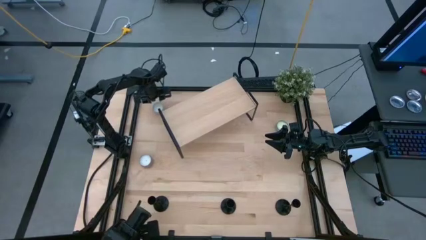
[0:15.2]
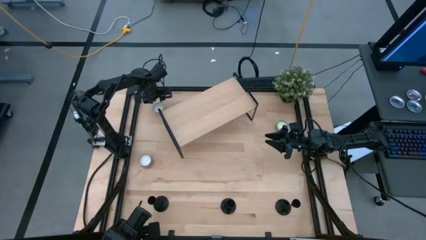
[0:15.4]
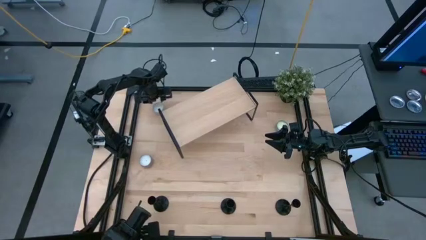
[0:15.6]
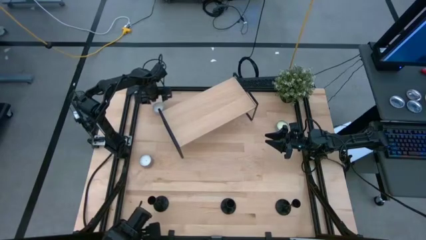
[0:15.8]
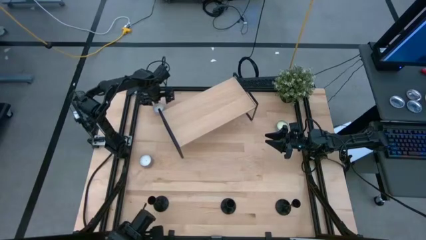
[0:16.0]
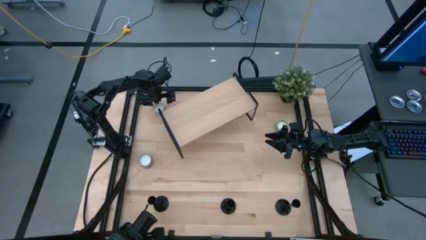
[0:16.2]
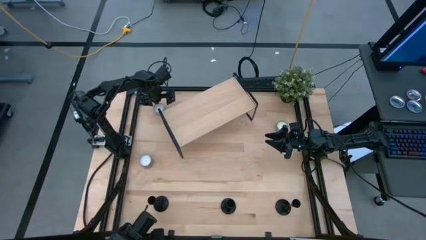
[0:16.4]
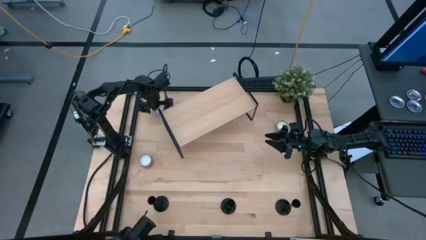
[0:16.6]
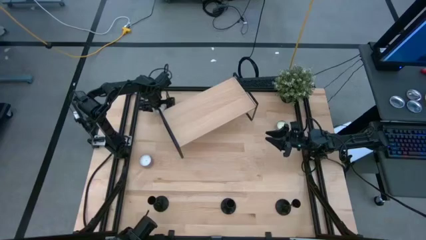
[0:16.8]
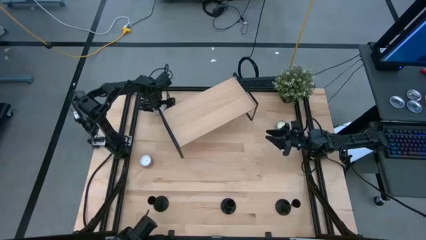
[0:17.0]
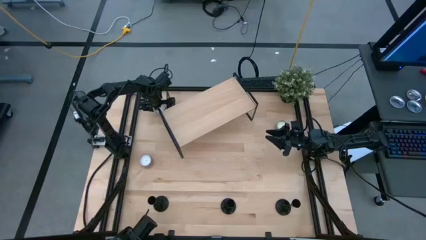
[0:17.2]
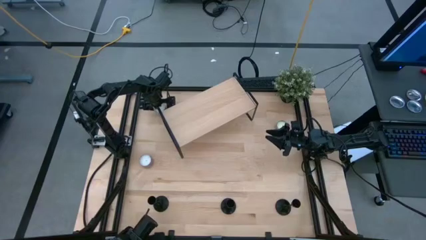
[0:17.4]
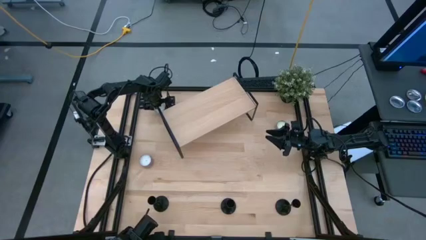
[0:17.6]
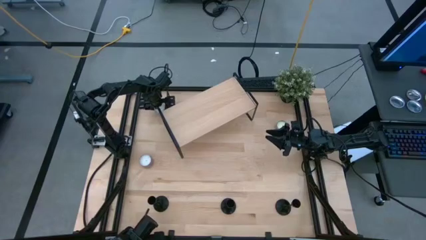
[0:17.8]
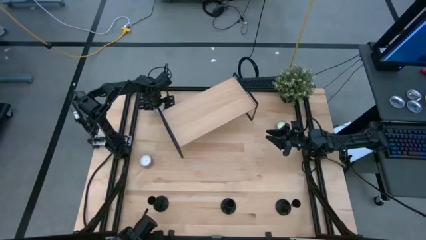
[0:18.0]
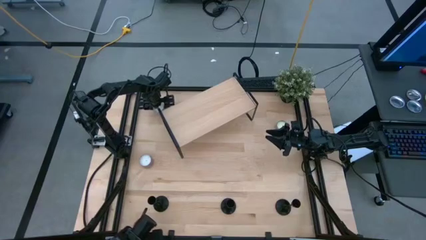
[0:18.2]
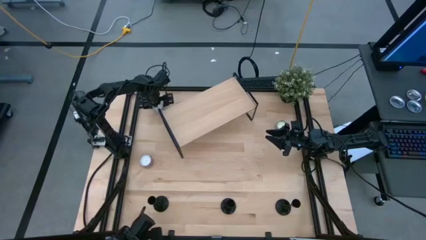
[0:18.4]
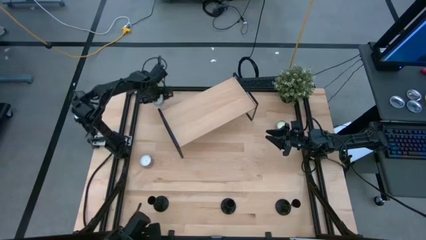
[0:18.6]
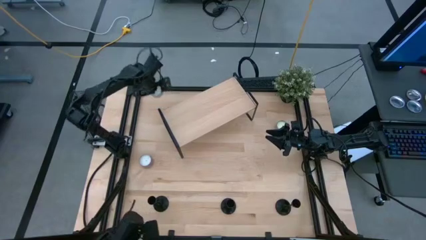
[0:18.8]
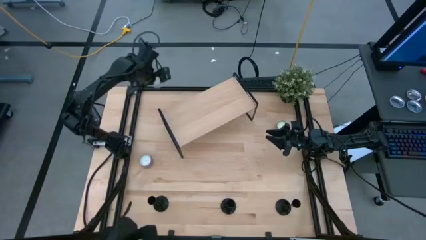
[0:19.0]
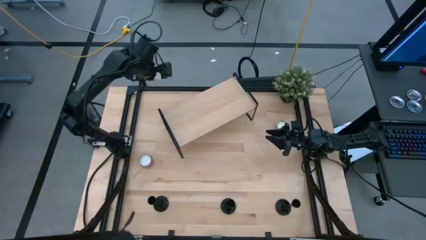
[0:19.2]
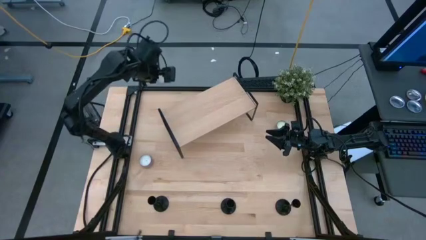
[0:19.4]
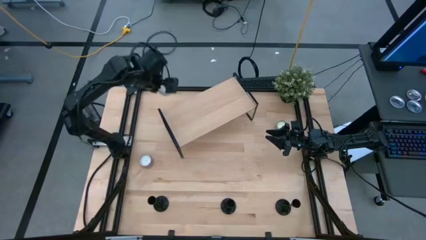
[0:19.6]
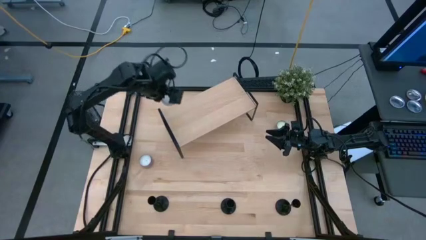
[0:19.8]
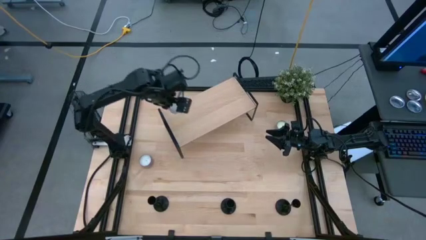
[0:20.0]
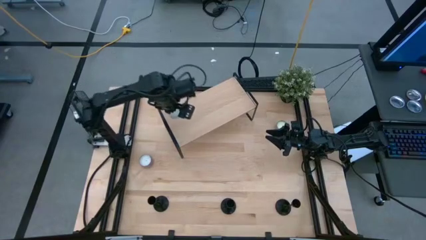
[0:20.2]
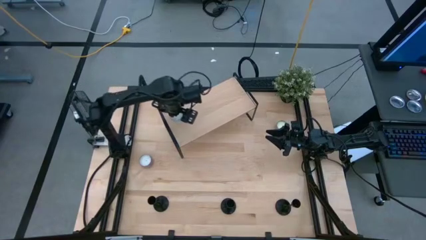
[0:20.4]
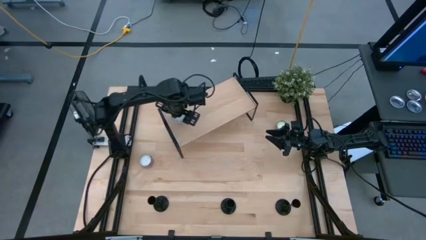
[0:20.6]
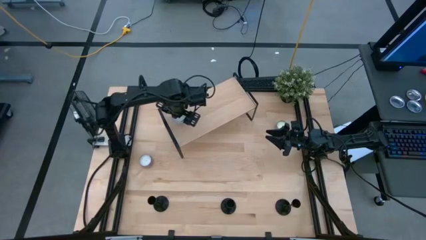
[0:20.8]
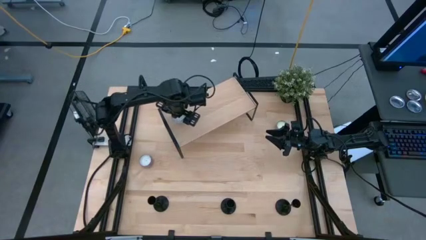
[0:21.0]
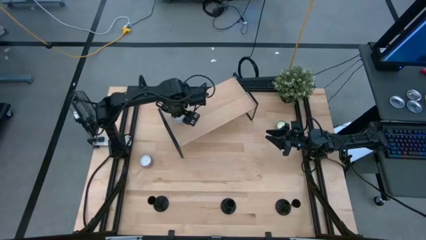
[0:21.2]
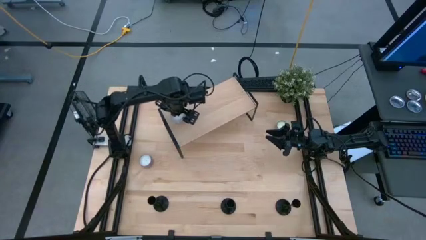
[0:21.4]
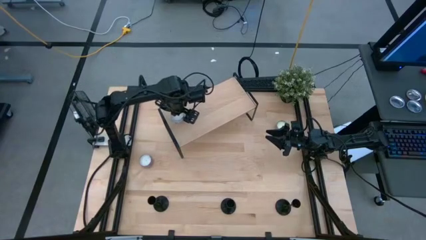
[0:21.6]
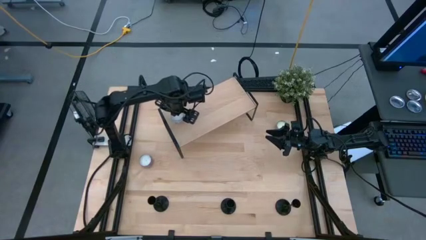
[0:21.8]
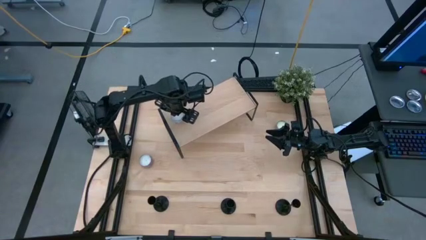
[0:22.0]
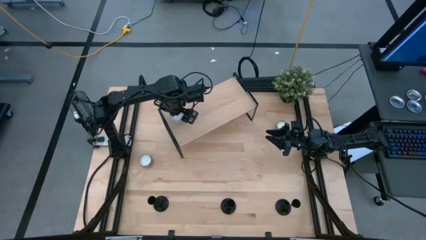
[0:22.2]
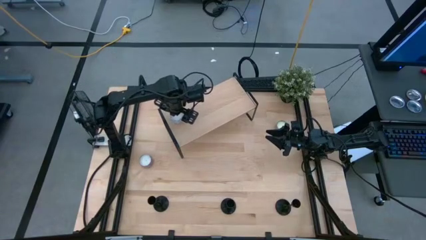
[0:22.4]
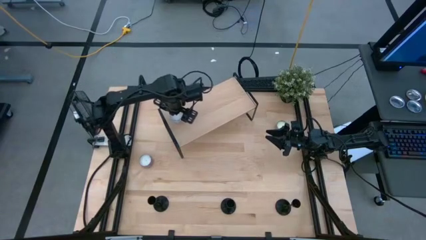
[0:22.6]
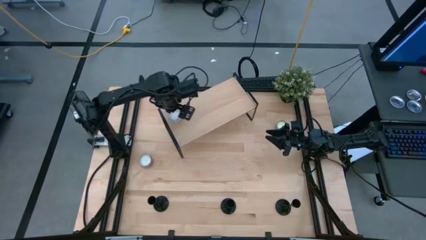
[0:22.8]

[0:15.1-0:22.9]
Task: Pick & Place candle stick holders
Put the red patterned scented candle on the shelf

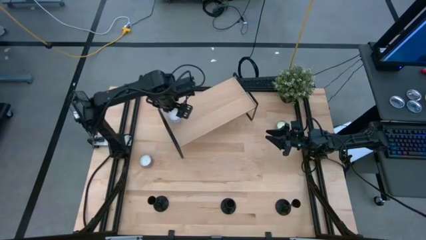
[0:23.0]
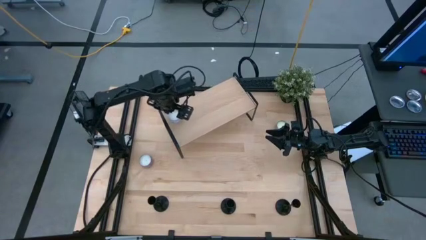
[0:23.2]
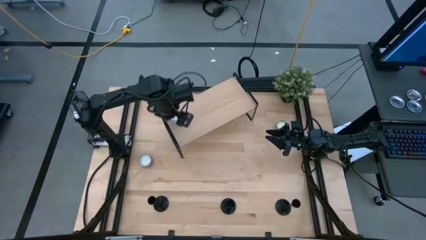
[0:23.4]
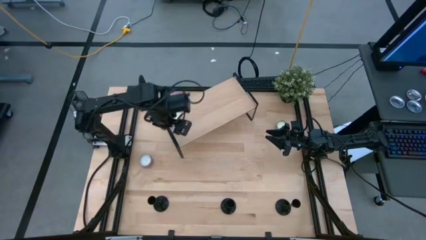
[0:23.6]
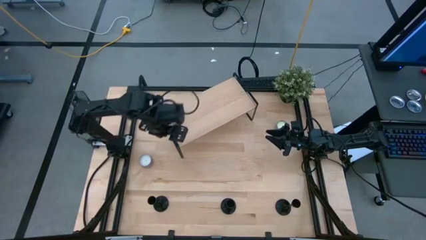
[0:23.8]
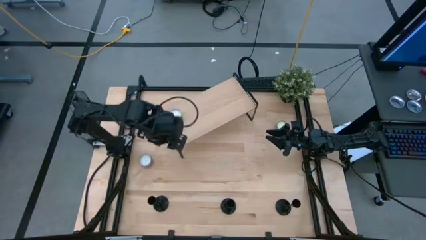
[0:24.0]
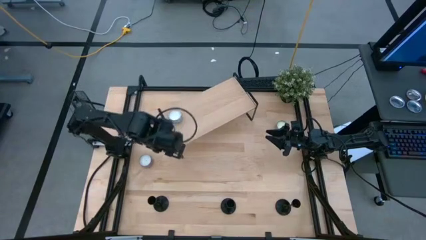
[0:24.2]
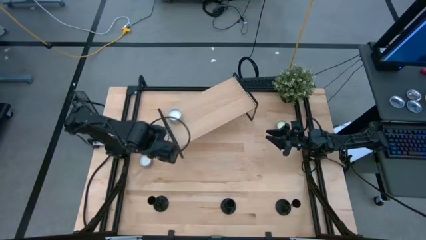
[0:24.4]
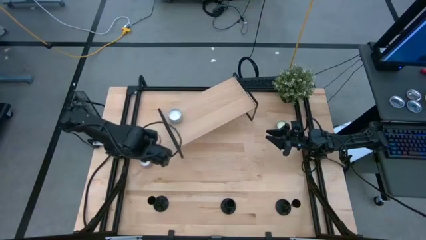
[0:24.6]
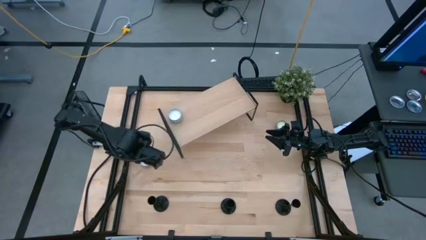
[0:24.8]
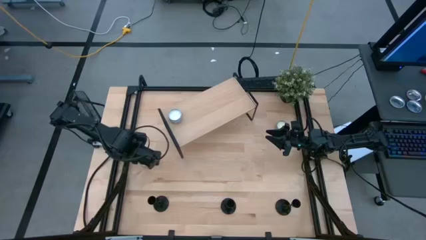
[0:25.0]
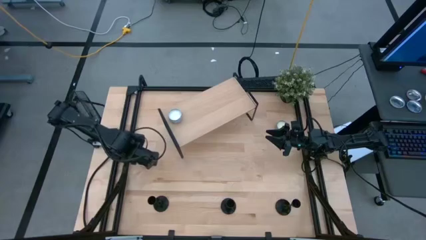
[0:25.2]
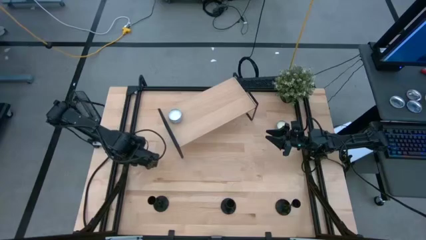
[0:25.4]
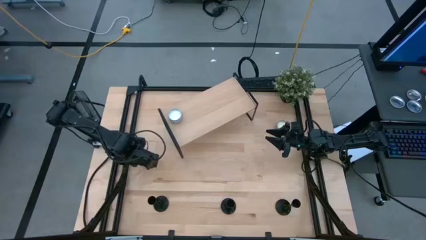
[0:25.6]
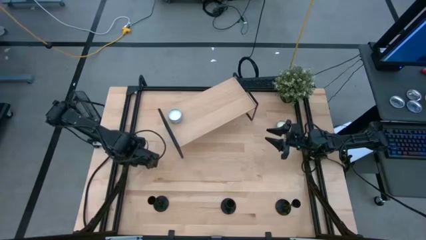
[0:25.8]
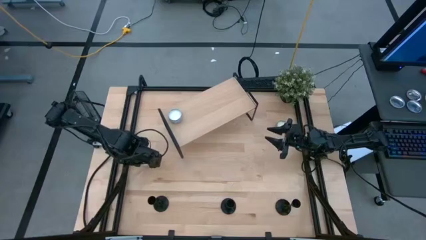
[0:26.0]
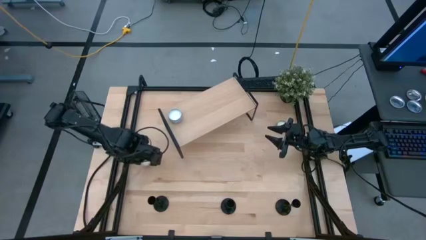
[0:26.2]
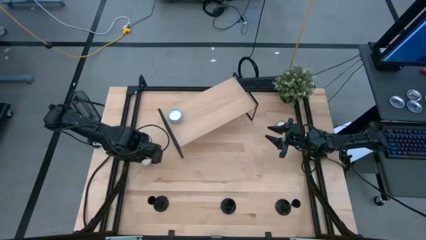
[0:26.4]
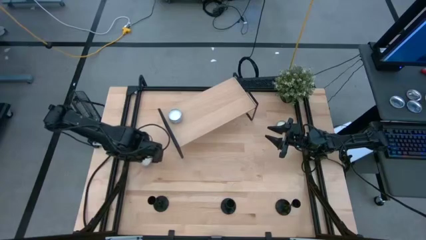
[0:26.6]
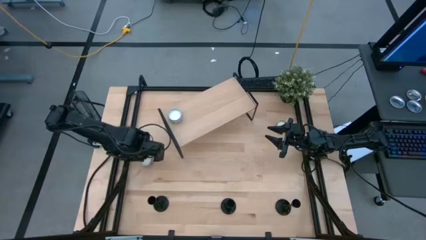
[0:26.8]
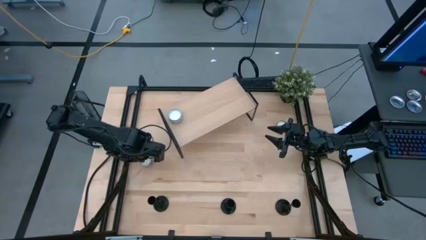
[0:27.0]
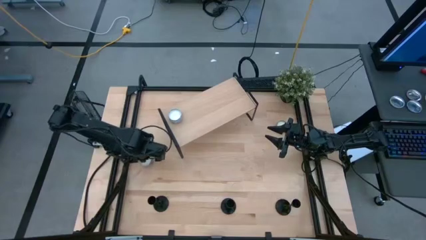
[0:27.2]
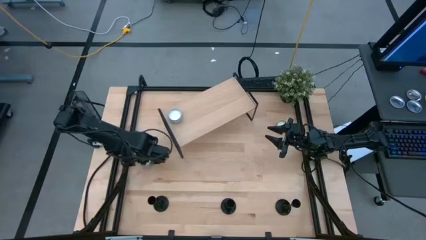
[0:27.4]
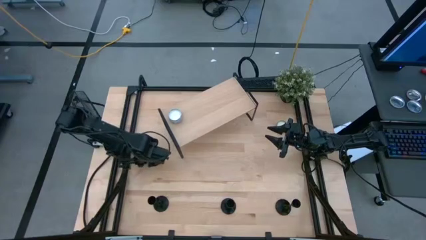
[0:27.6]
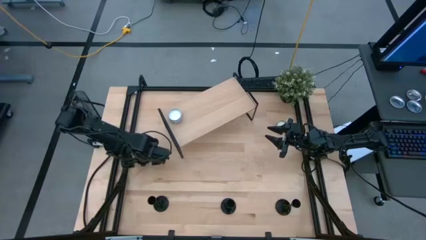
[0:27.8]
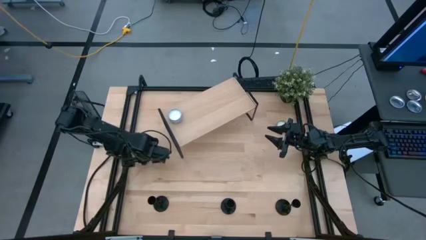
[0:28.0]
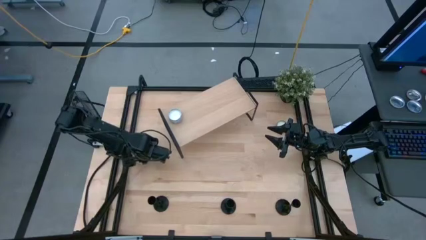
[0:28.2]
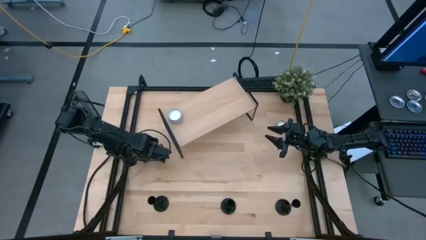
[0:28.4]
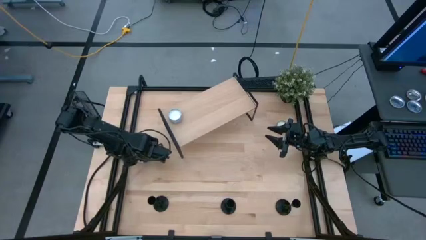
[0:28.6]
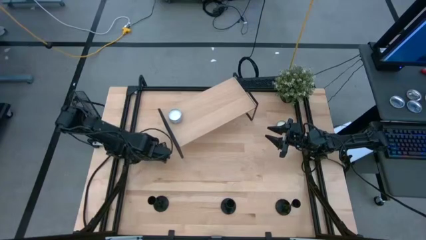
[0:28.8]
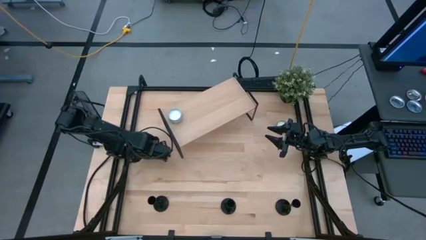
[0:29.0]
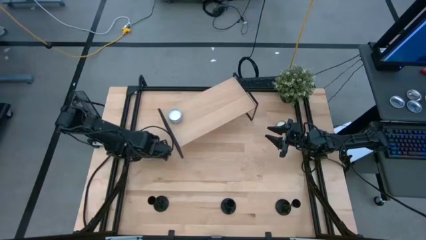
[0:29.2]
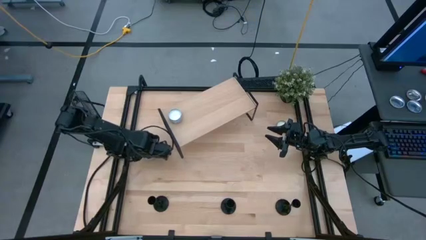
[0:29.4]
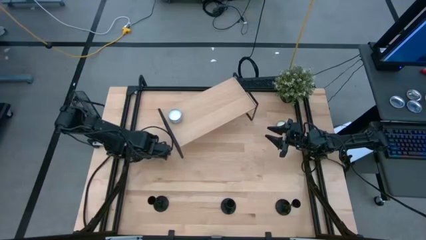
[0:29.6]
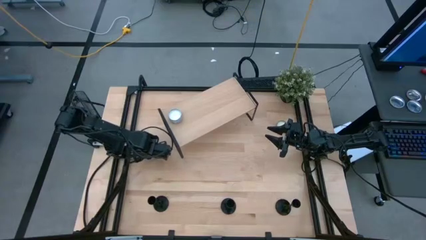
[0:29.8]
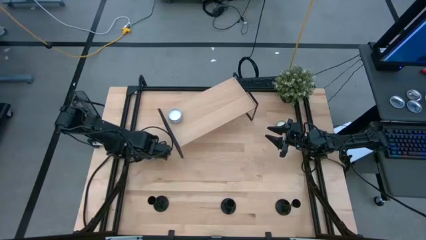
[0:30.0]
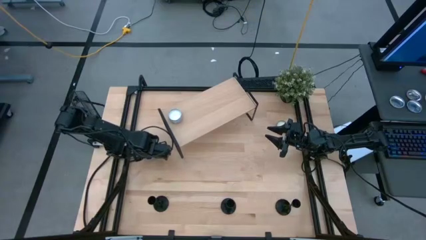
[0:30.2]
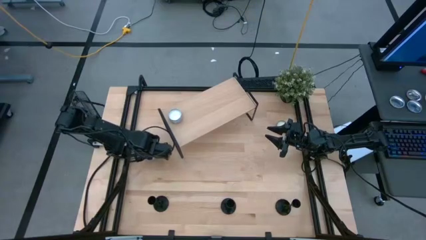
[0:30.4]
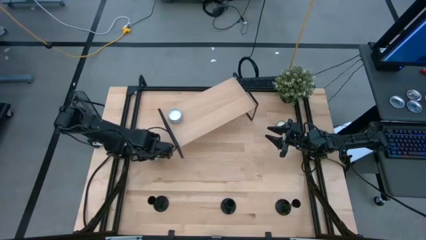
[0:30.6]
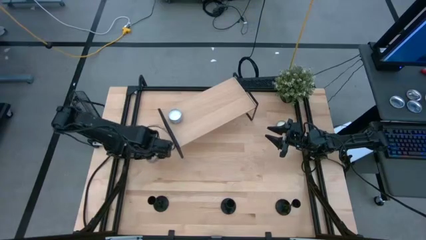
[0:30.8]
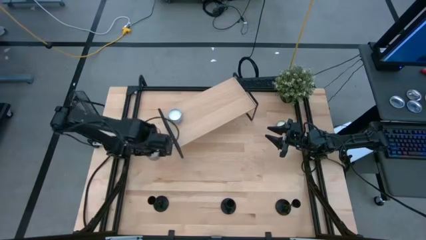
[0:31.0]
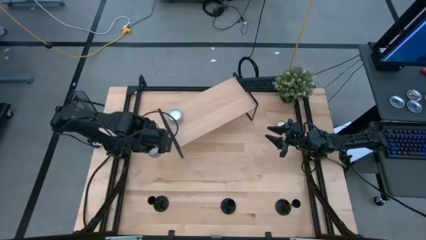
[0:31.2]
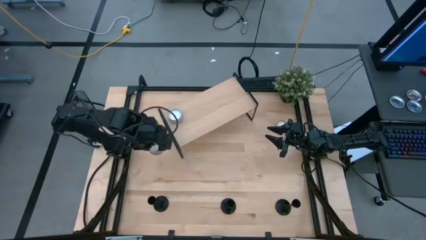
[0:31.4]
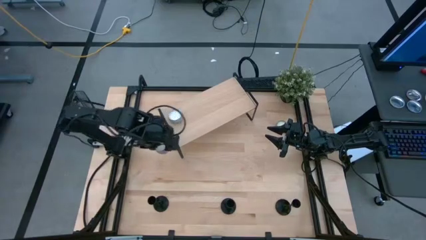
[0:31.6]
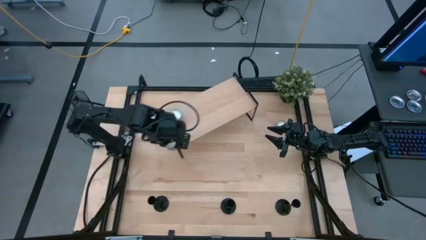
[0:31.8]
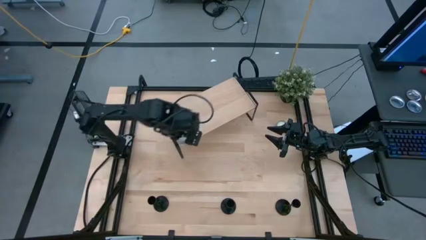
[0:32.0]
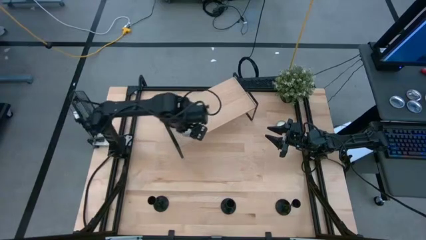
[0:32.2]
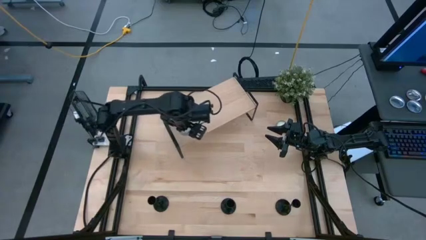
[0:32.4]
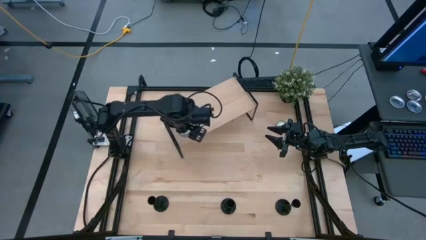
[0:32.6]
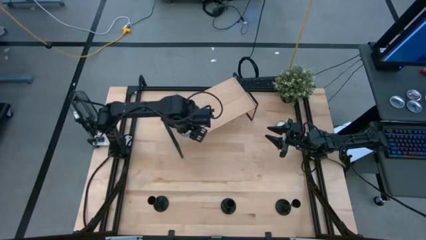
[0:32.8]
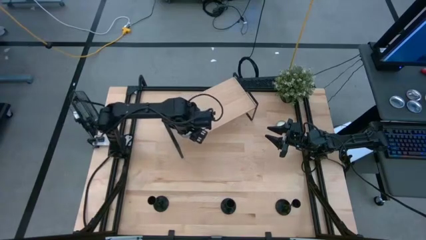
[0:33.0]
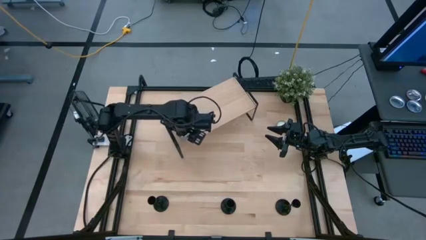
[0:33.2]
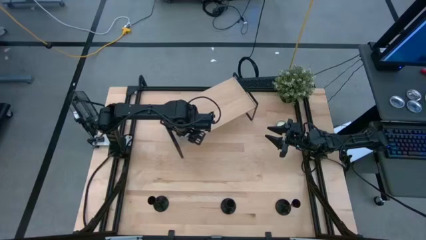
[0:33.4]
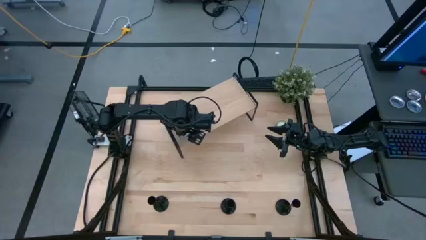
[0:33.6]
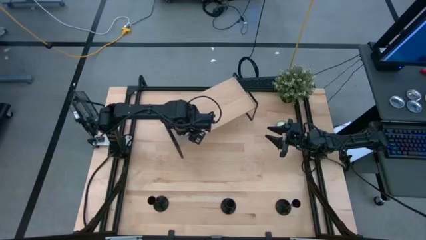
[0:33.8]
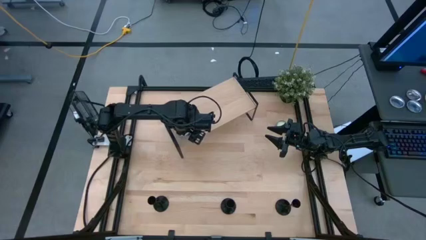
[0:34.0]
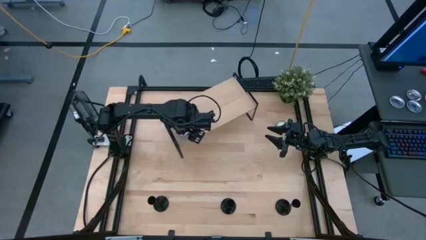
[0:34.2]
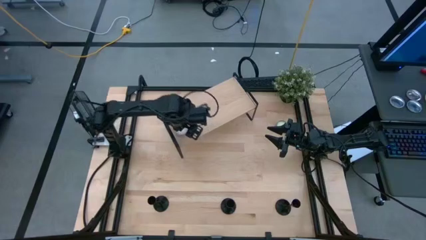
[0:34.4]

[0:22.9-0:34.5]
Put the pink patterned scented candle on the shelf
